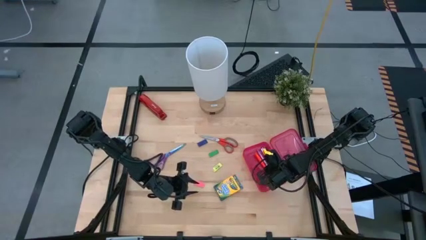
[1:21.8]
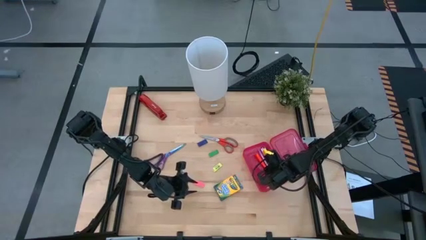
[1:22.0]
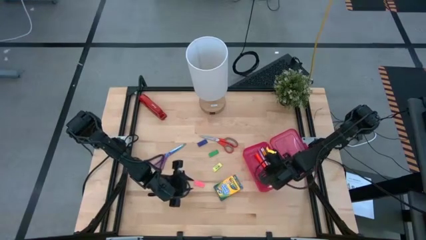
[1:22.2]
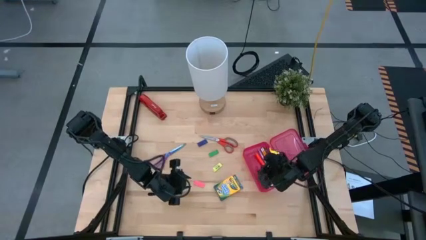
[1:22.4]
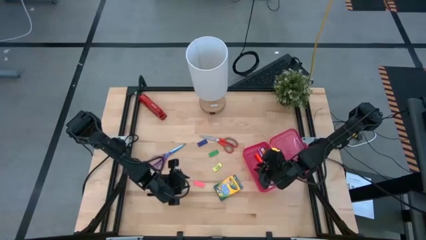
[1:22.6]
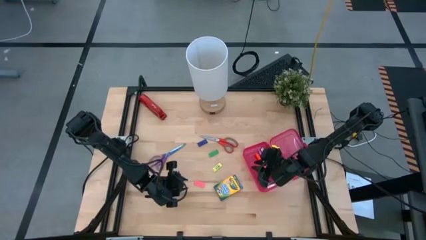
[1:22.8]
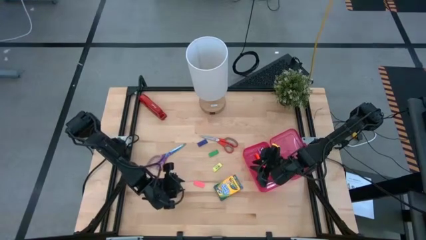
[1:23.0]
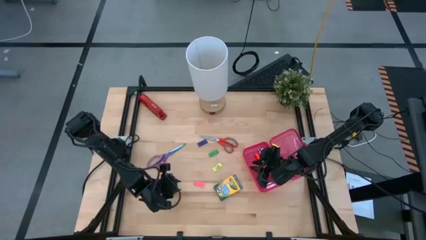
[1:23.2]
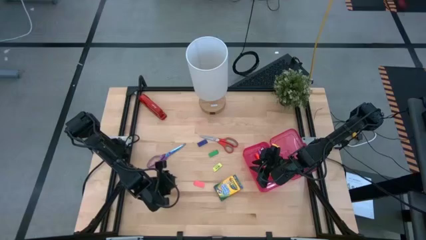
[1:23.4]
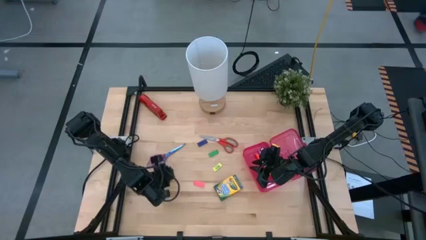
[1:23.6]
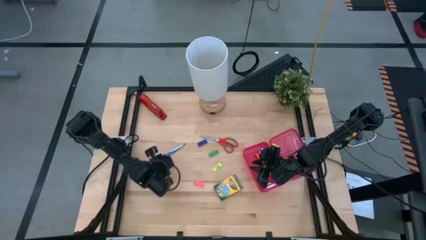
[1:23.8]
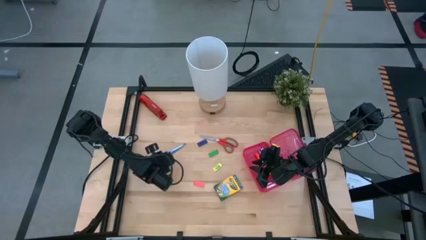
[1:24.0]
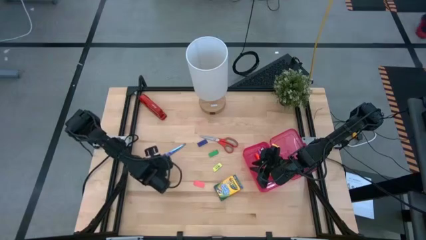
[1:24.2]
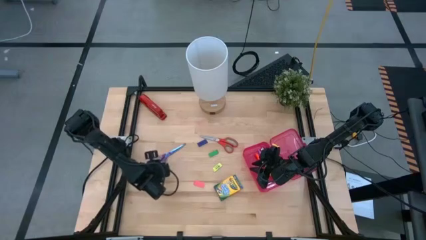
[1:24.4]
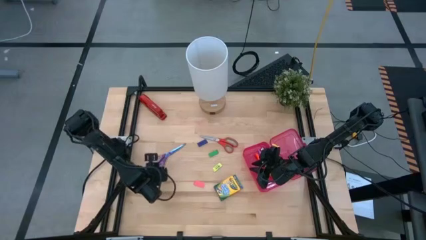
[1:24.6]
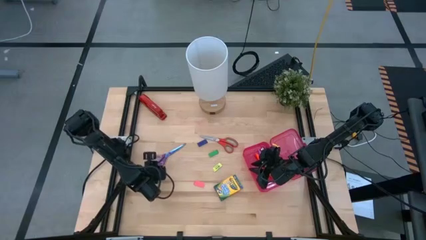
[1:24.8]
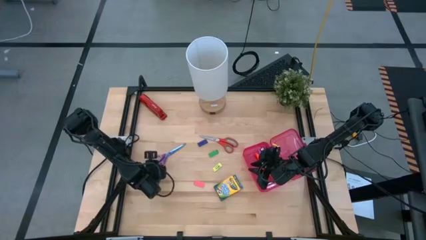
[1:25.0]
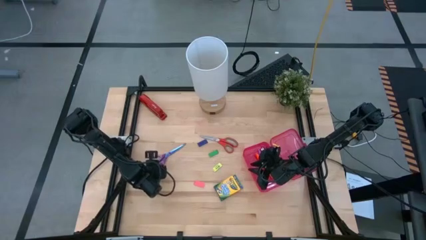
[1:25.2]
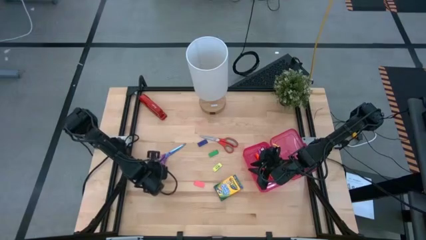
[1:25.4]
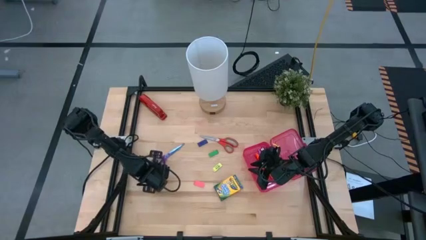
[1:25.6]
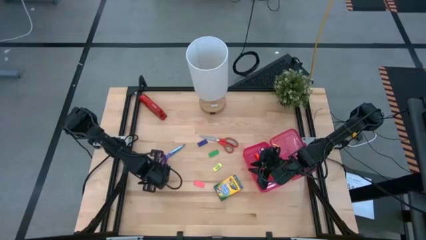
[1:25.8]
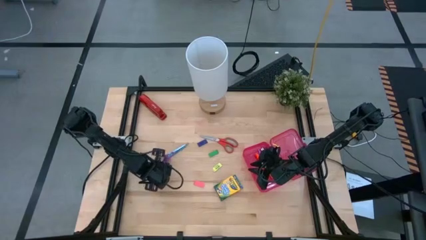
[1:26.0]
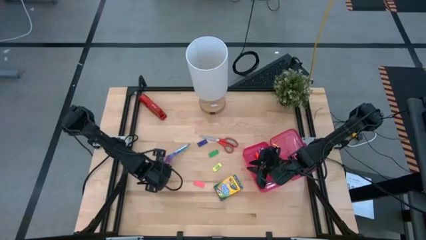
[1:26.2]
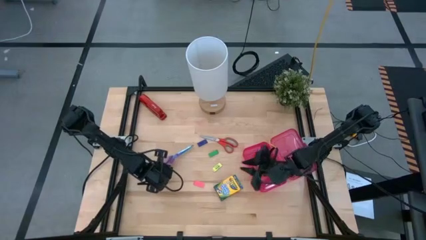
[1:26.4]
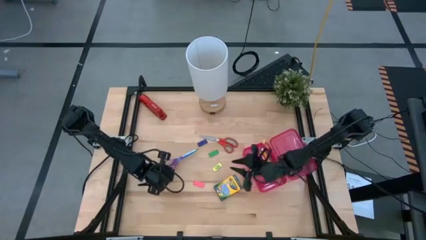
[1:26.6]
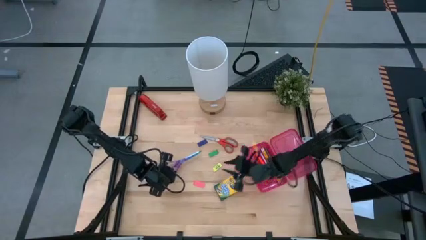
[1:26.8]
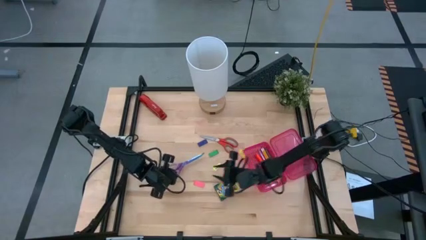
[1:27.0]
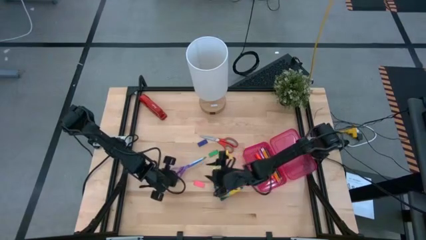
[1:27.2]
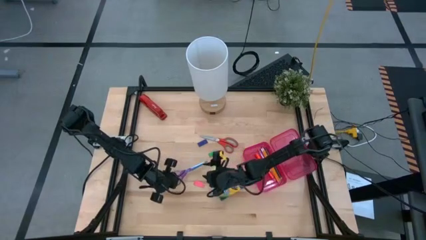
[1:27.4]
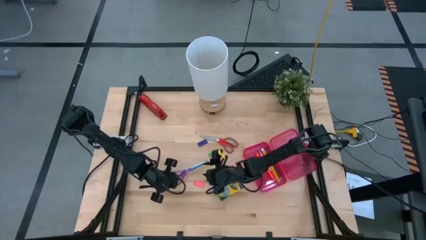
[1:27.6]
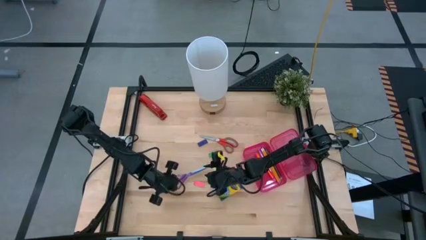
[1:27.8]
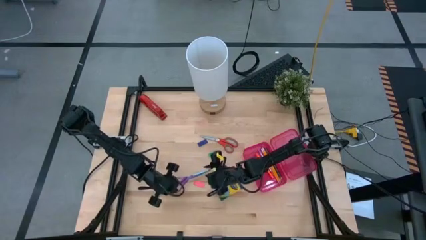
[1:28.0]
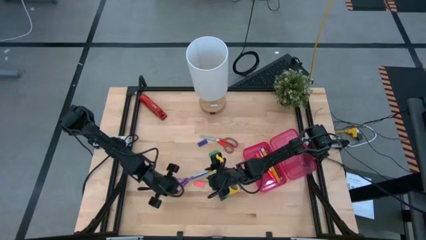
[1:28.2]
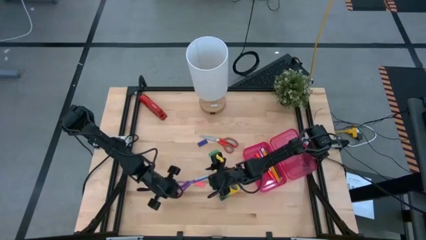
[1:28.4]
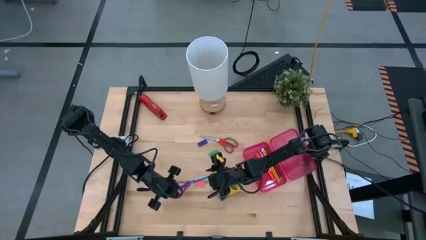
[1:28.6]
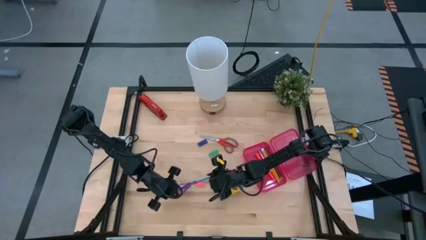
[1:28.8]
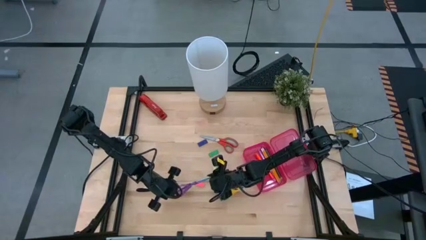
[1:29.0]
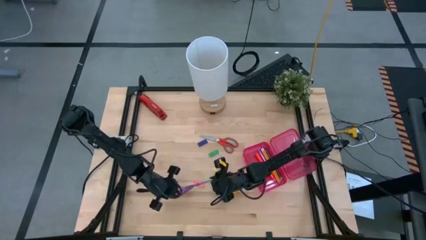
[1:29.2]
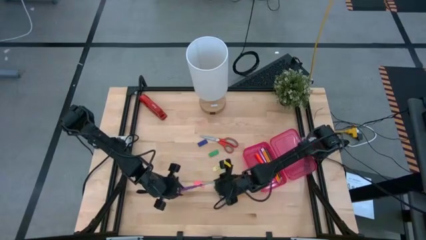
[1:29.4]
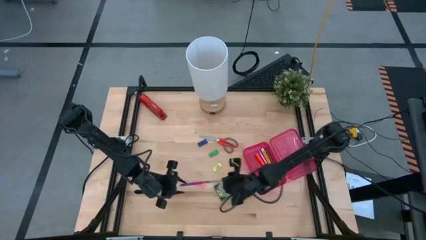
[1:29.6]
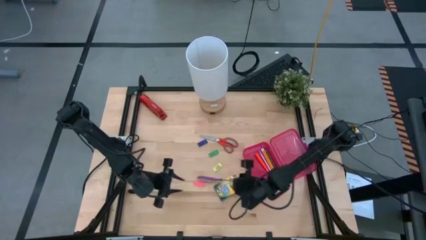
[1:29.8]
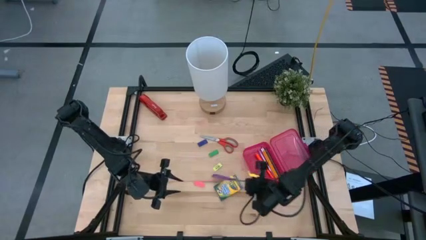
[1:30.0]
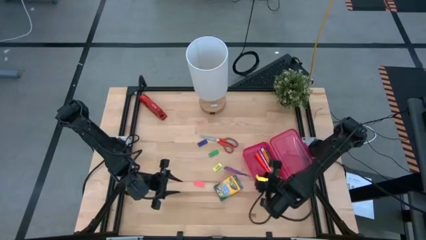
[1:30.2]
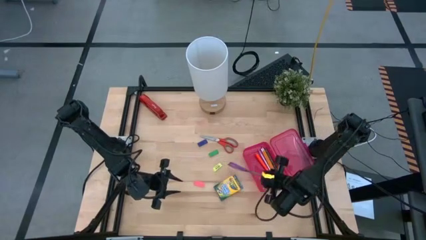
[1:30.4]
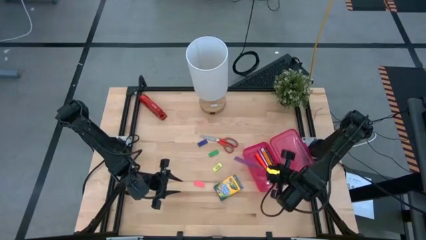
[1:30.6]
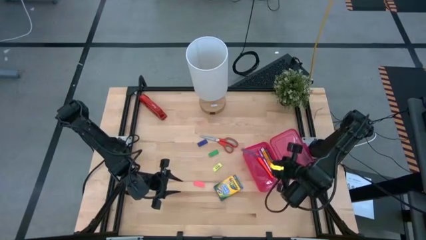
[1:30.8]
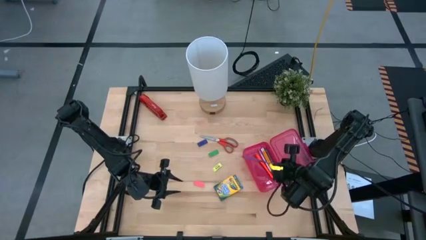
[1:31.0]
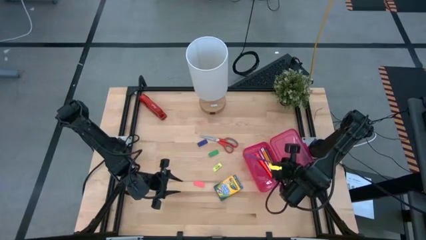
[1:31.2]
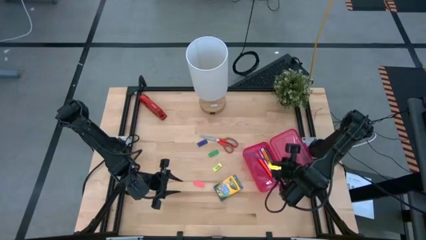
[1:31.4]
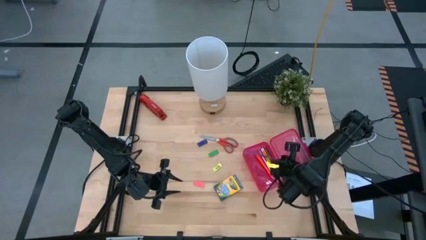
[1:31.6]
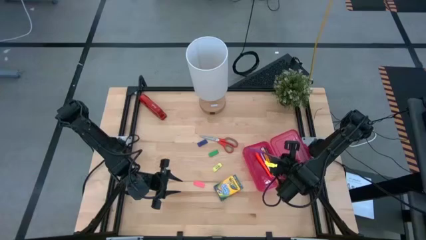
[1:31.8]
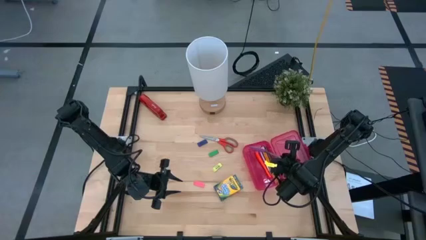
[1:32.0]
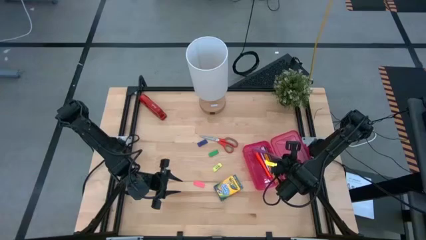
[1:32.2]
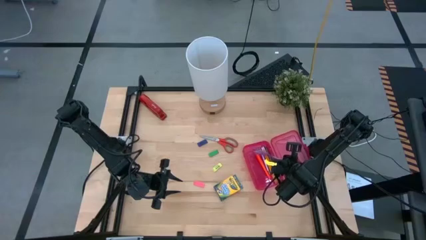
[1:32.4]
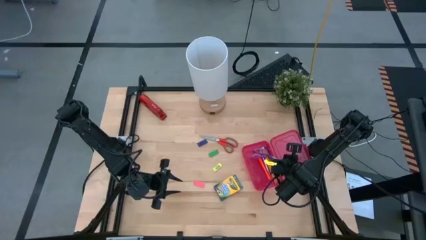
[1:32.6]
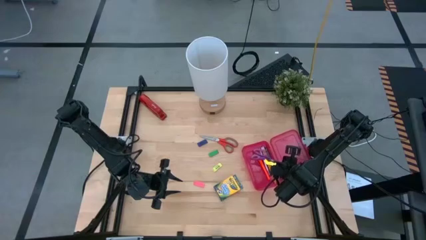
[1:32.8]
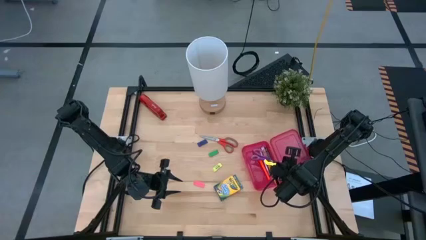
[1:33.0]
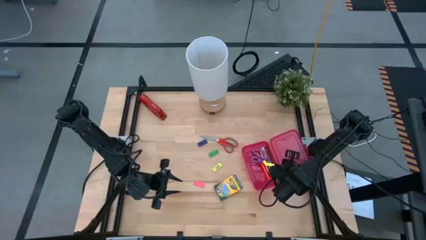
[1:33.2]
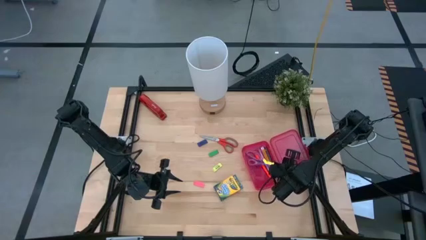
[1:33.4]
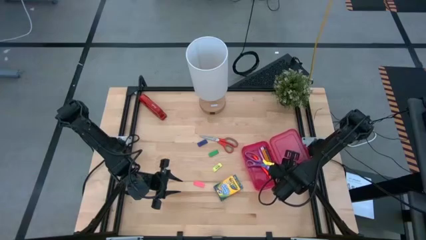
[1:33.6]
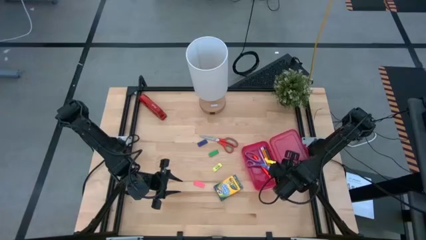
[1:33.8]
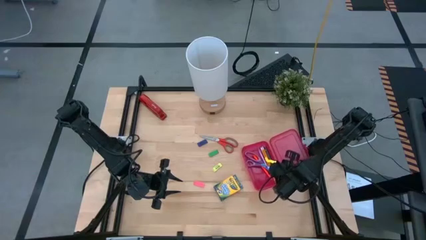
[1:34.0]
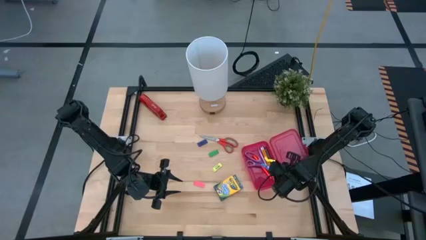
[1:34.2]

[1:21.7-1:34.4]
Task: Pack school essentials
Put the violet scissors into the pink supply box

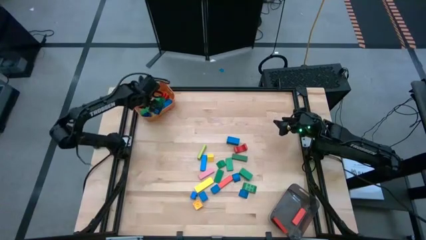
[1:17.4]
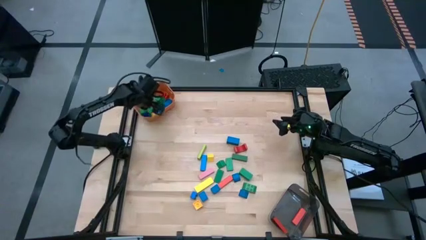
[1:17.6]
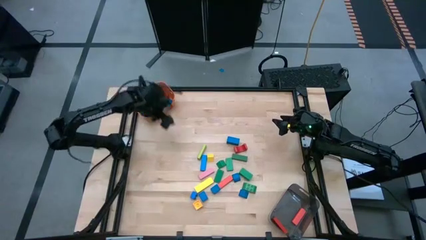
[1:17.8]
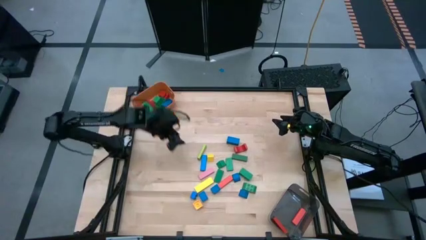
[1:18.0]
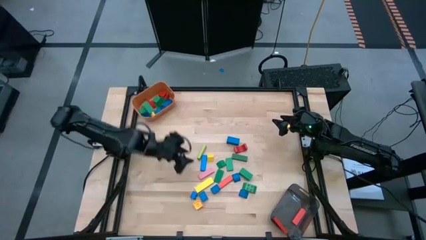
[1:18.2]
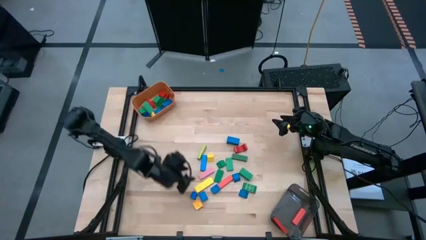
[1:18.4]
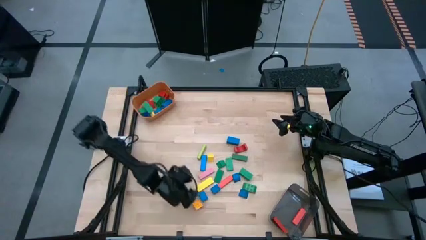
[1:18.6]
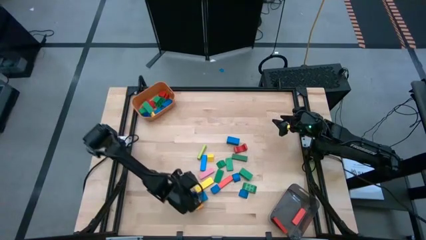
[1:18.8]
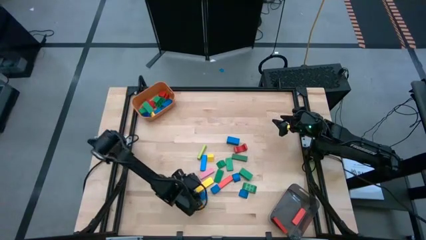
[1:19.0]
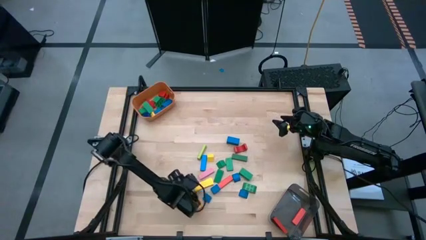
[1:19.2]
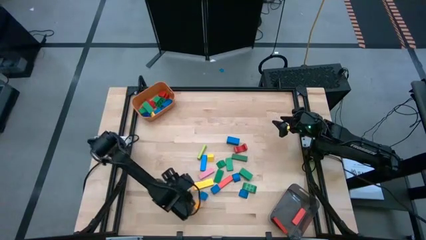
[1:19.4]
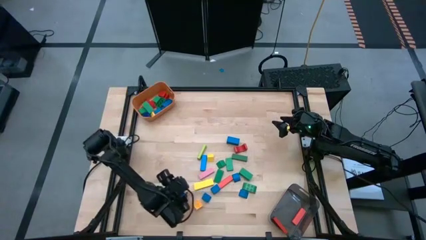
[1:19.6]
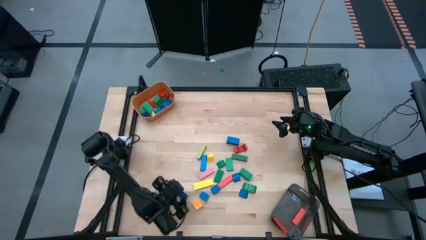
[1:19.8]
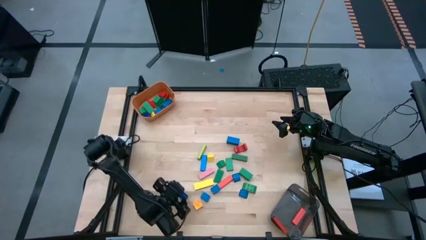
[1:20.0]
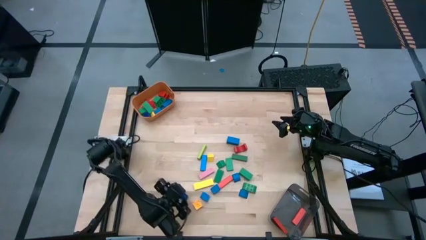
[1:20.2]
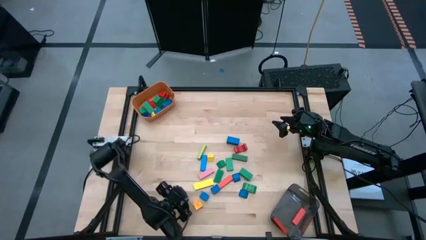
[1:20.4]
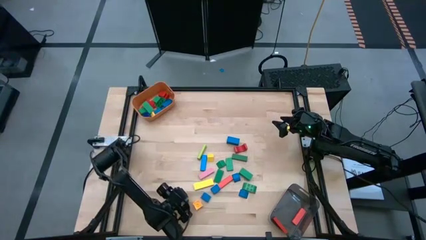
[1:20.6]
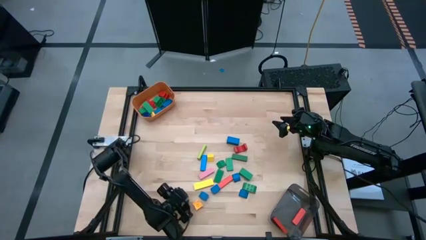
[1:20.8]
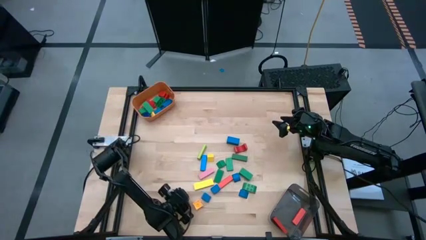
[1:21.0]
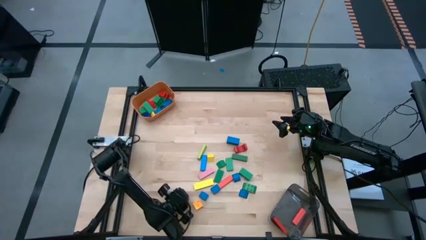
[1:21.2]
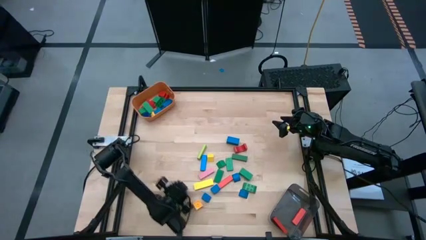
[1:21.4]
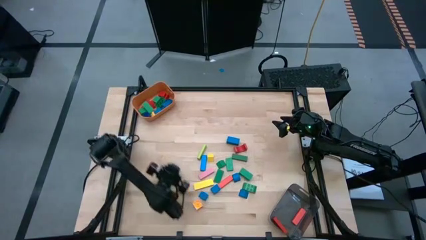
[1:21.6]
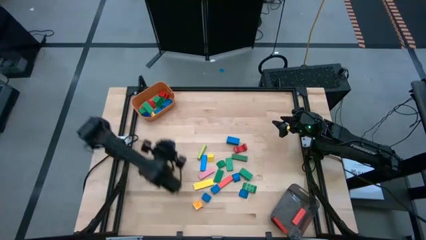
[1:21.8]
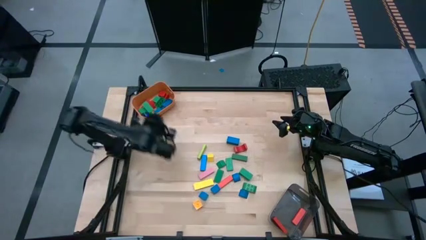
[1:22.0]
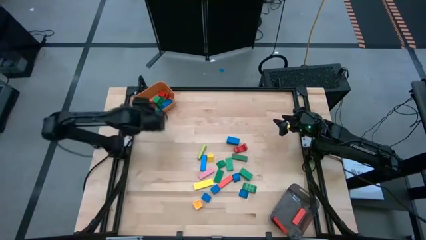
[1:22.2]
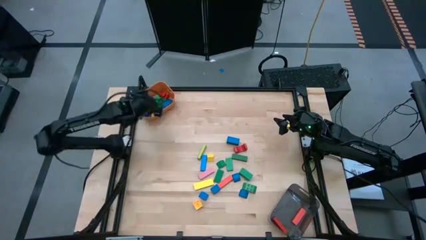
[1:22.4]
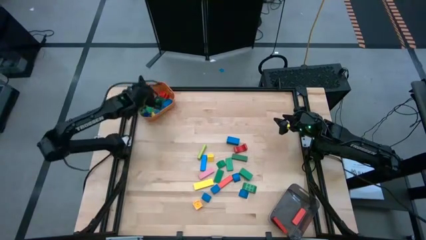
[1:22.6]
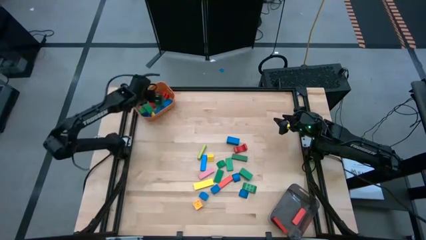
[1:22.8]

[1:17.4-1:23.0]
Task: Sort blocks by size
Put the small blue game piece into the orange bin
